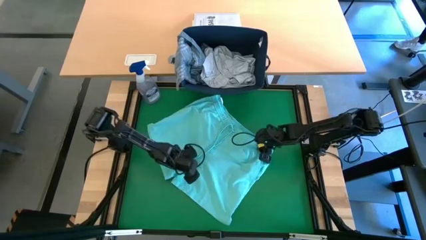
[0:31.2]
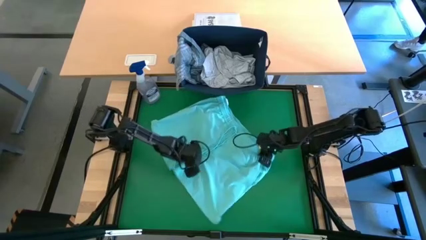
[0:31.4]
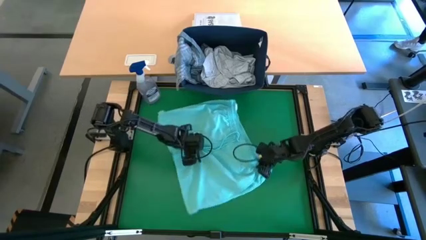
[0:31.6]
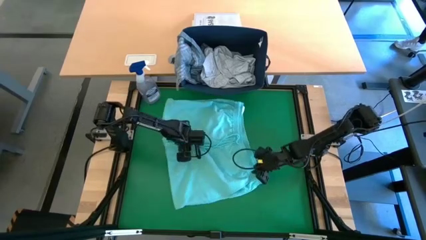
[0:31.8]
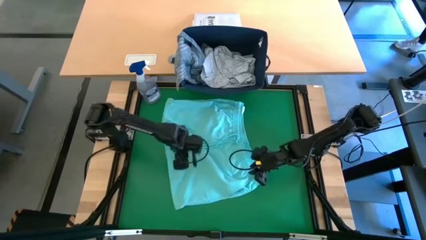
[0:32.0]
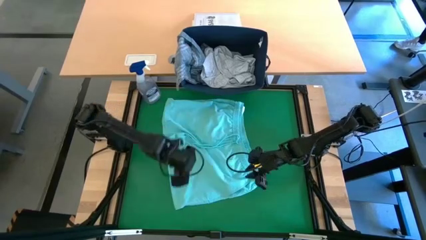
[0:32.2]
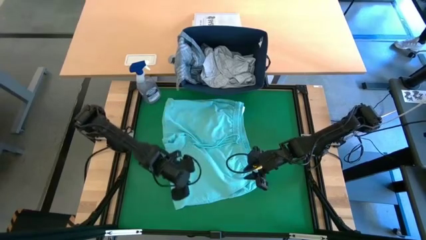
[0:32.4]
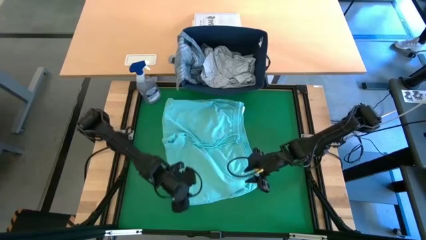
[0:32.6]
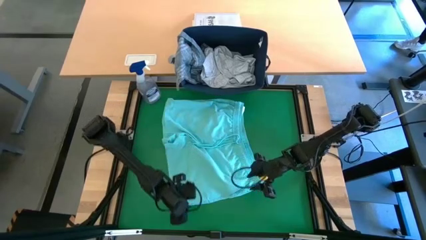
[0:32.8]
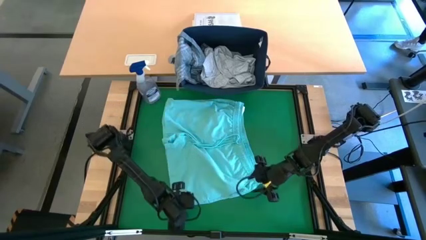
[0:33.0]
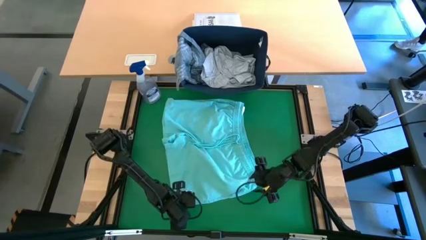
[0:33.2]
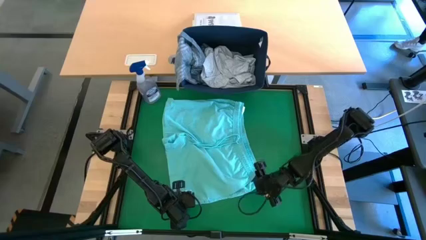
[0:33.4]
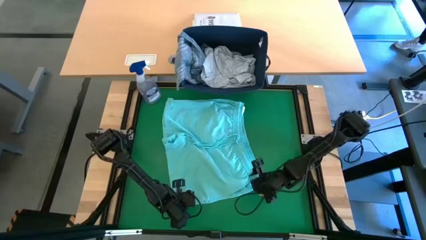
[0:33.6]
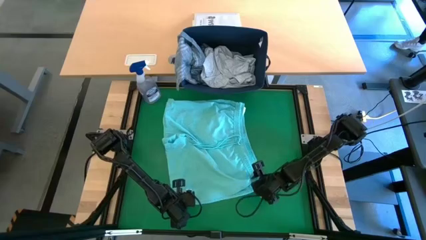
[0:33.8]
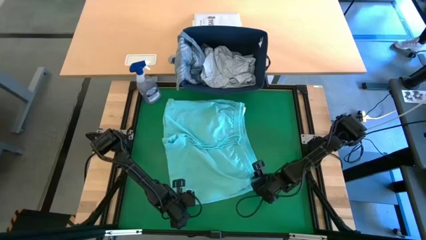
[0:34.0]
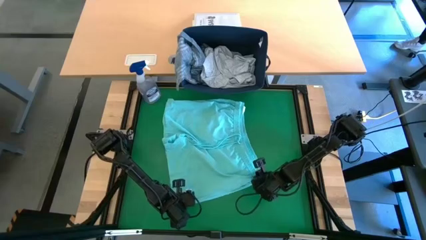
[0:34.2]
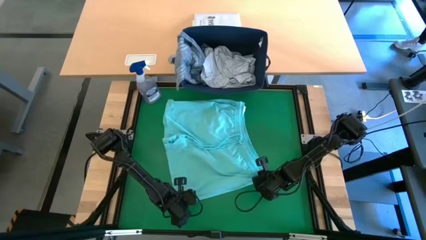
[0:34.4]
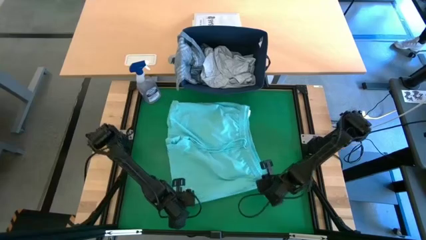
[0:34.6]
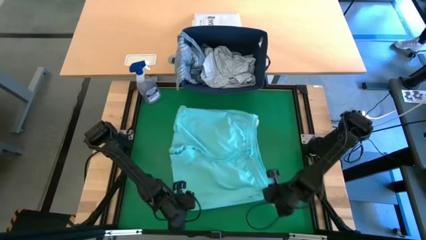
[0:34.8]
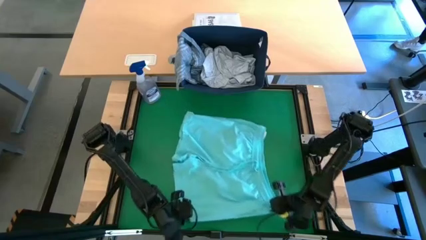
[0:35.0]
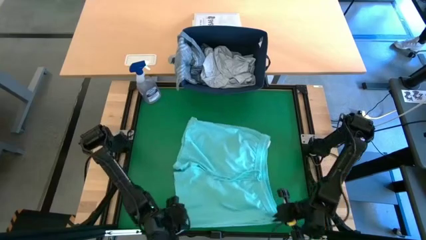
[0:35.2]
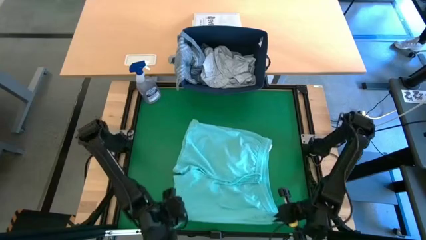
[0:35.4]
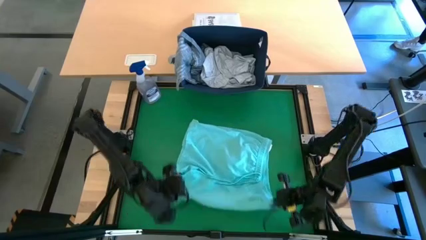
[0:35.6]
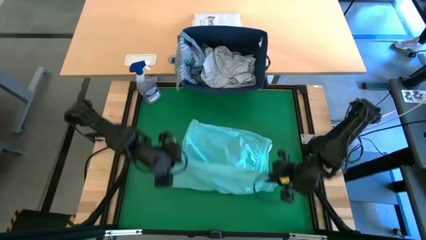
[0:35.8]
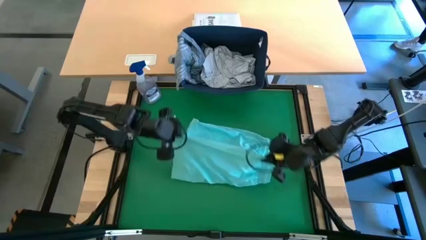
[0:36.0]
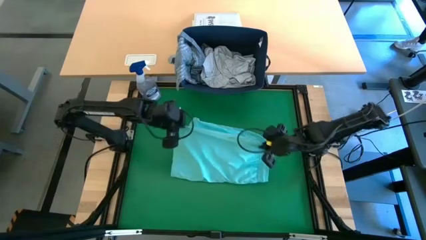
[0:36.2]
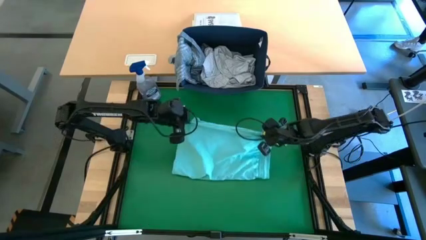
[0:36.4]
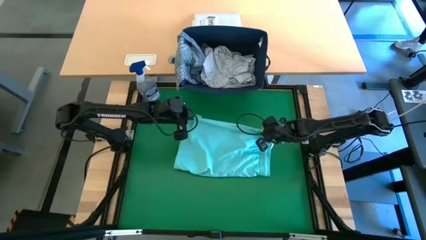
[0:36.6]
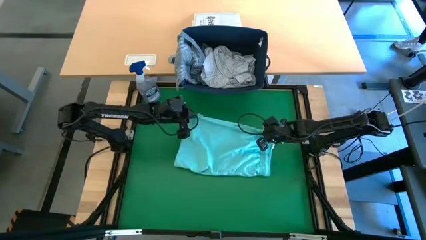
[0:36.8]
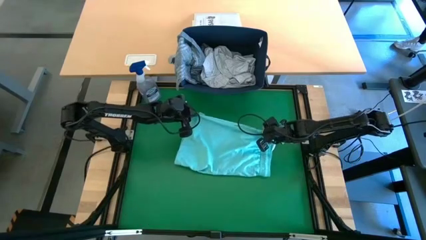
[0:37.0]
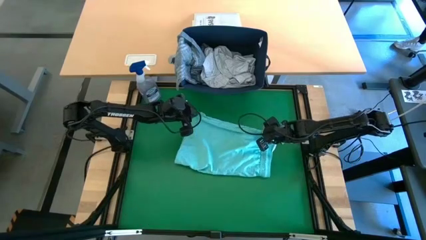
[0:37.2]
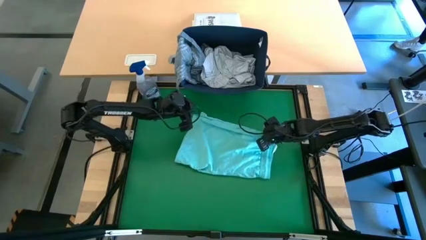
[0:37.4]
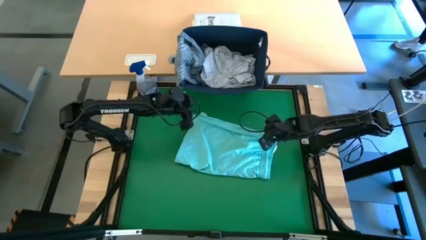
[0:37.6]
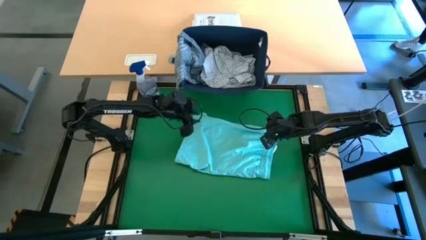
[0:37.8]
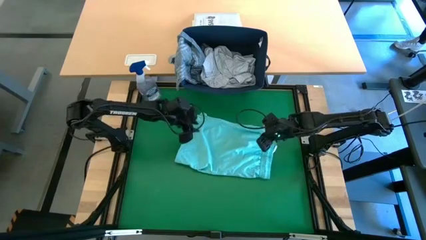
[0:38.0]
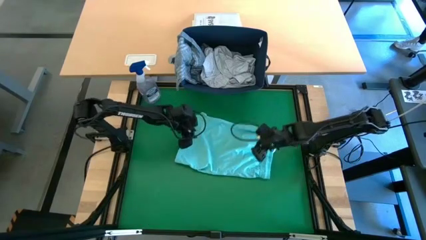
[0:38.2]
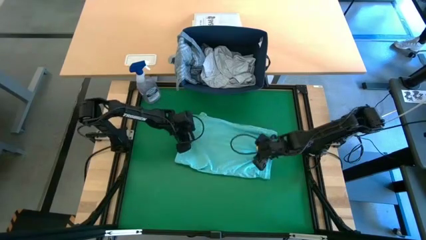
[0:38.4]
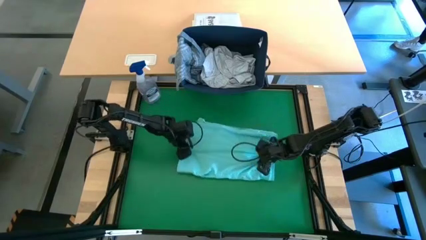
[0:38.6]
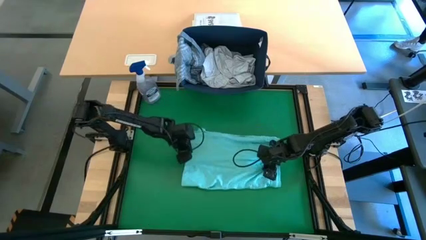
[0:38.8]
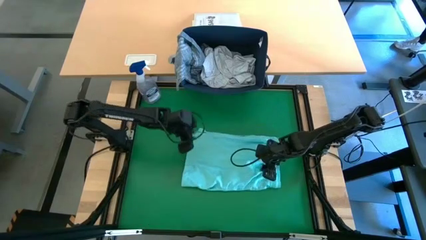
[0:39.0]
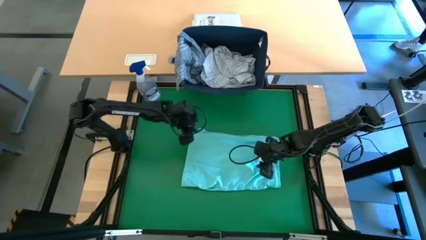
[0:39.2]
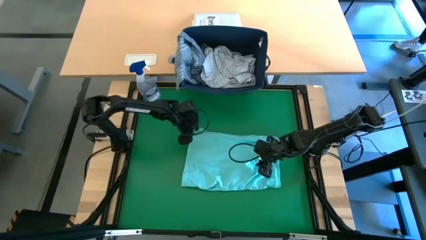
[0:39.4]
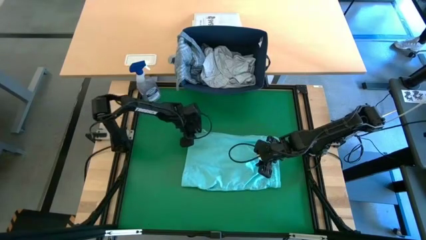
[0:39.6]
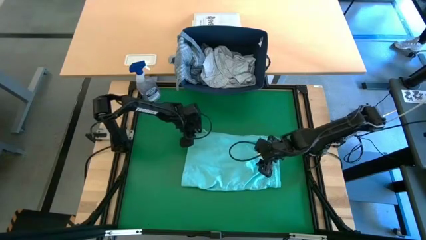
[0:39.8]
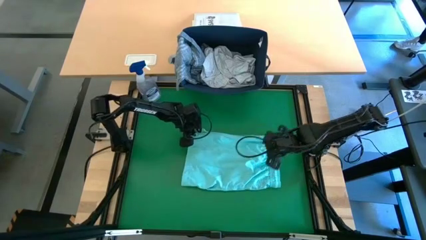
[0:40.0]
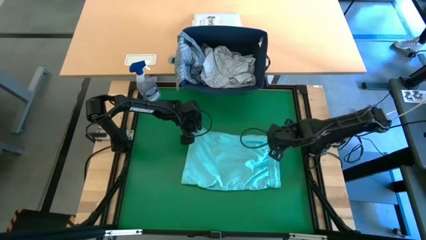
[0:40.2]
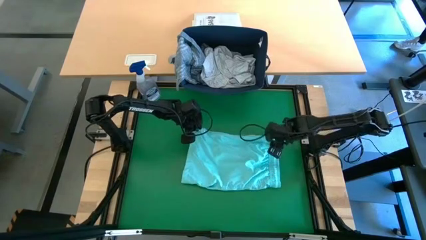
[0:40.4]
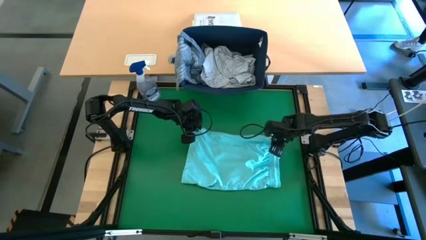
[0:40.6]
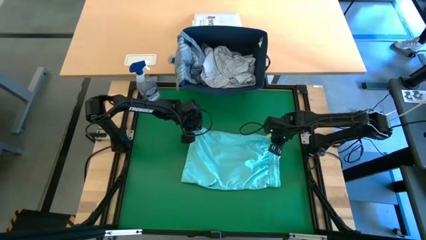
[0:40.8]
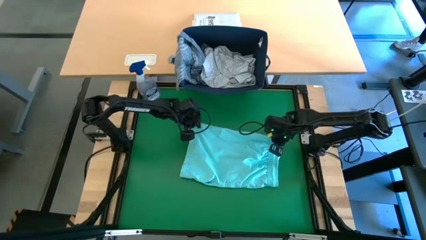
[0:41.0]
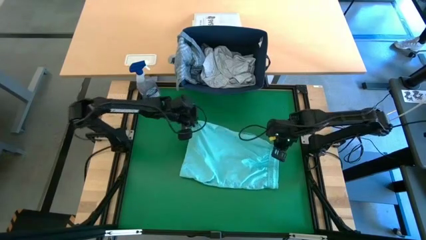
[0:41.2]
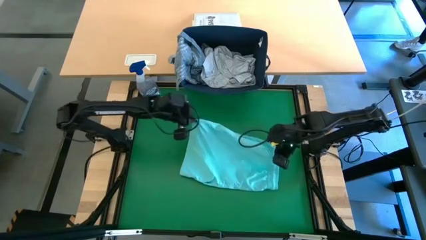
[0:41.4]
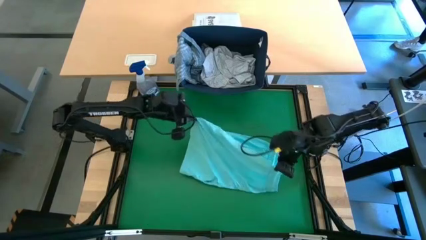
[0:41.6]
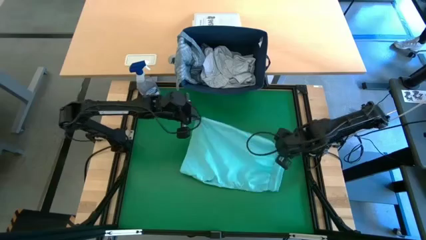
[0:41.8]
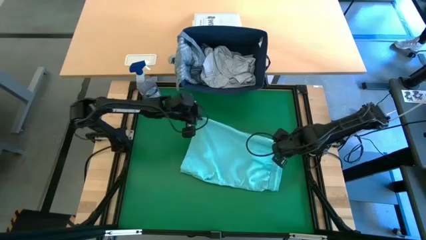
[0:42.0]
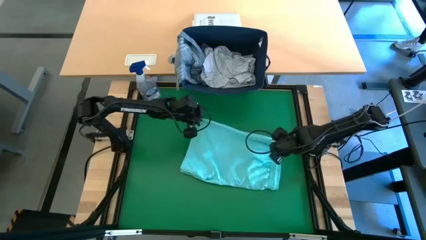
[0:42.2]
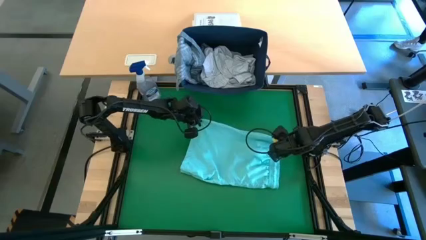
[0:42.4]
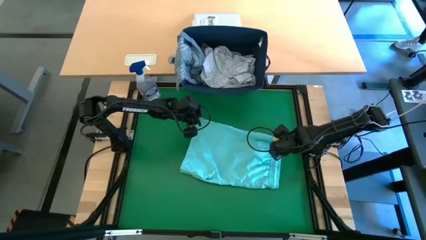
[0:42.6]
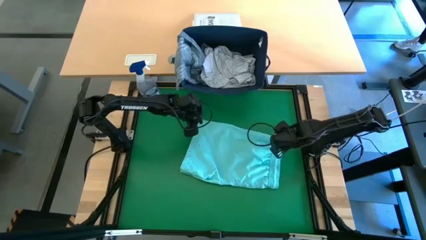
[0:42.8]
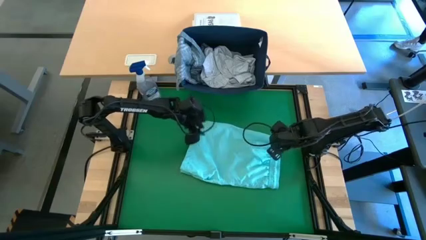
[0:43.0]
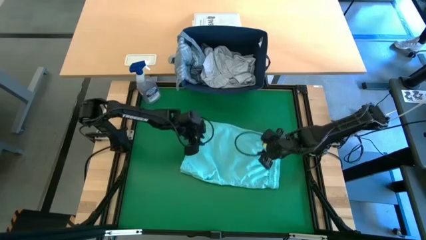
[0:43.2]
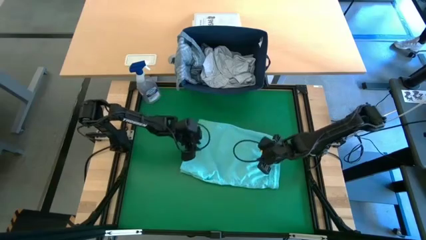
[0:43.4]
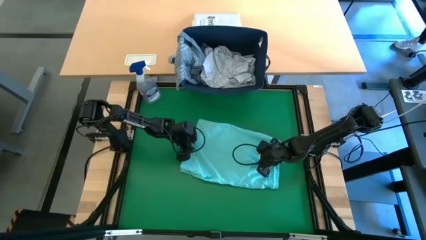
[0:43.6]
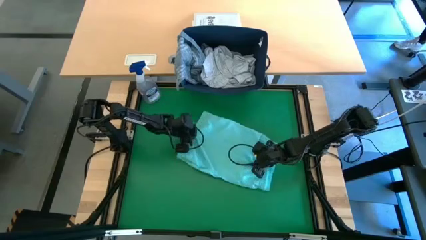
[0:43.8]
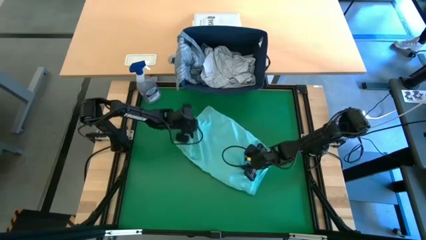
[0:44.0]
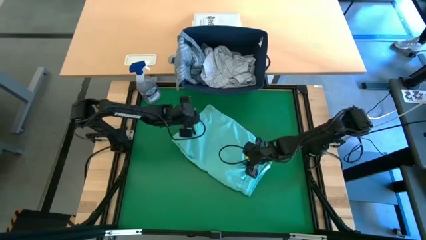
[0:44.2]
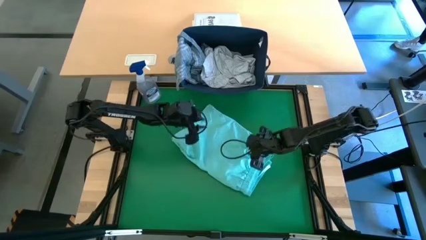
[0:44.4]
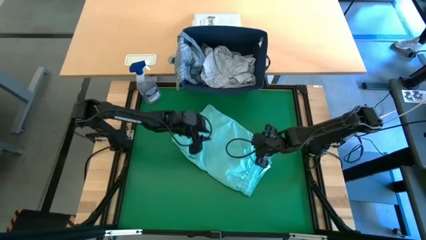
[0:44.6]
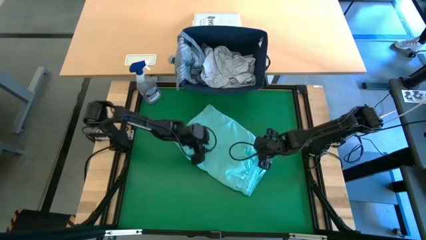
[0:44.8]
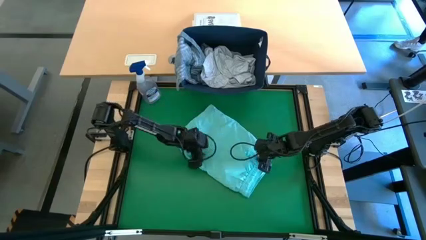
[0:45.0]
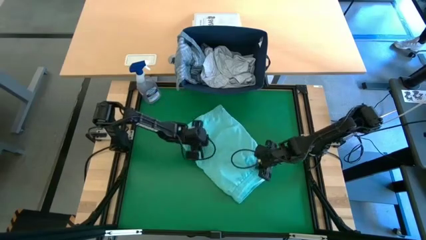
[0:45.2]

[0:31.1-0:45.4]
Task: Fold laundry
Fold the blue short

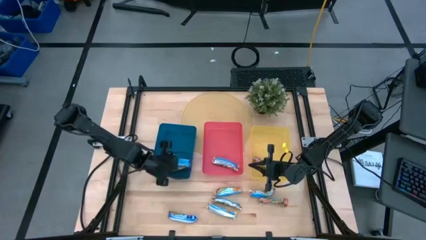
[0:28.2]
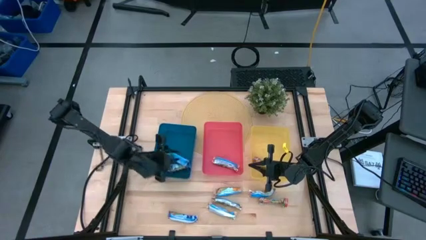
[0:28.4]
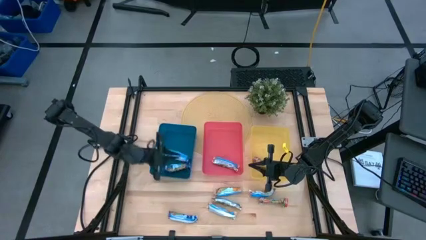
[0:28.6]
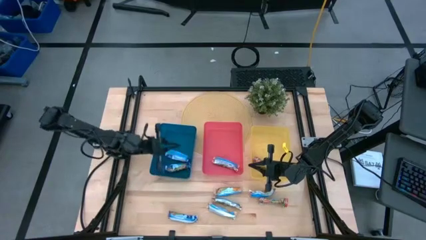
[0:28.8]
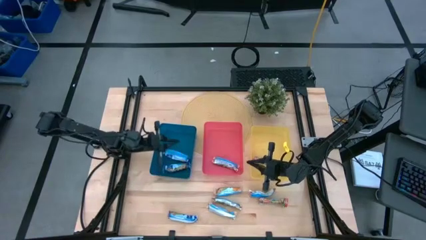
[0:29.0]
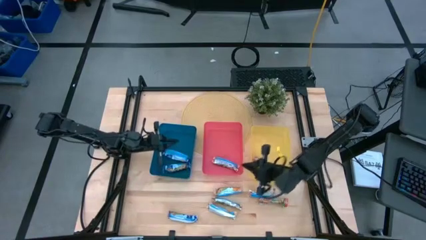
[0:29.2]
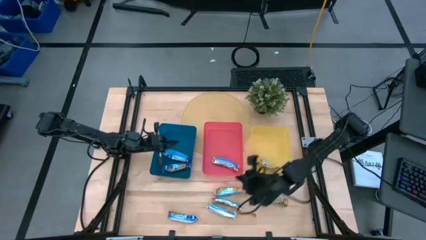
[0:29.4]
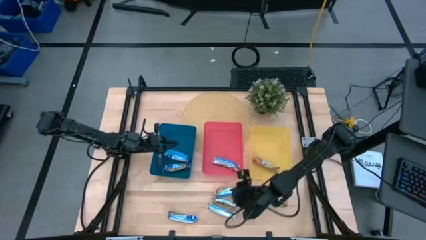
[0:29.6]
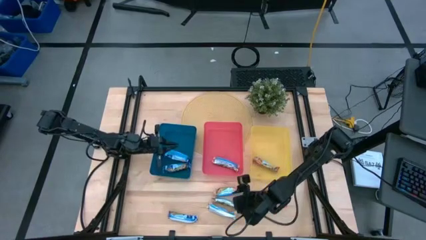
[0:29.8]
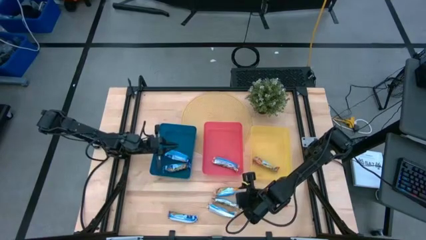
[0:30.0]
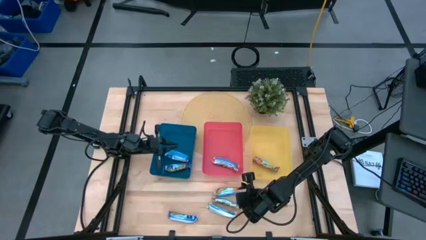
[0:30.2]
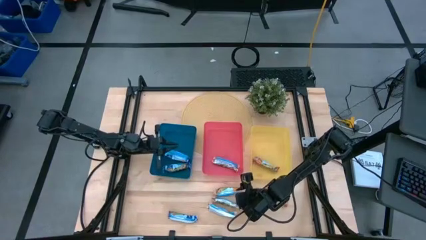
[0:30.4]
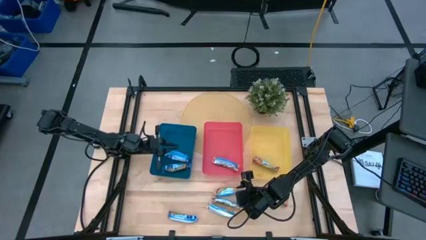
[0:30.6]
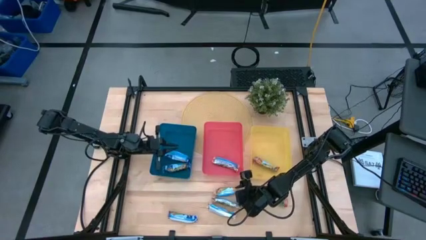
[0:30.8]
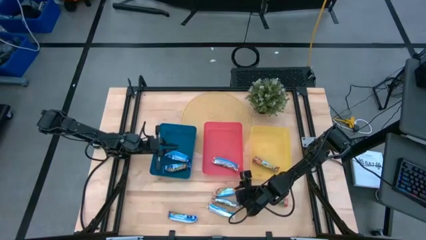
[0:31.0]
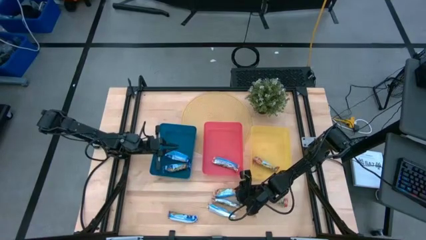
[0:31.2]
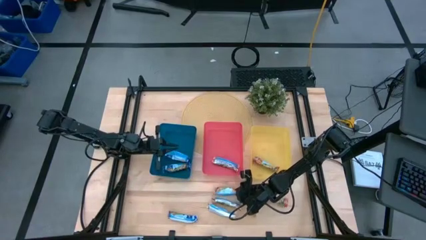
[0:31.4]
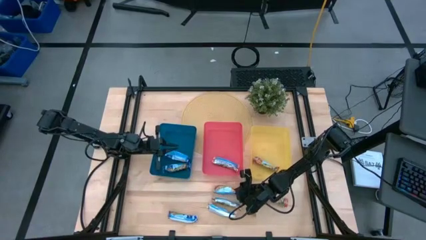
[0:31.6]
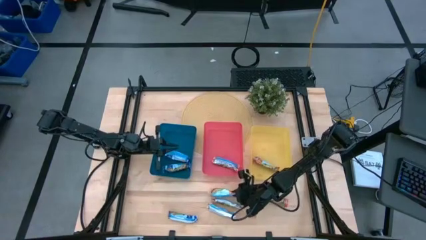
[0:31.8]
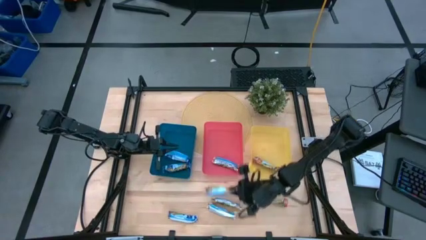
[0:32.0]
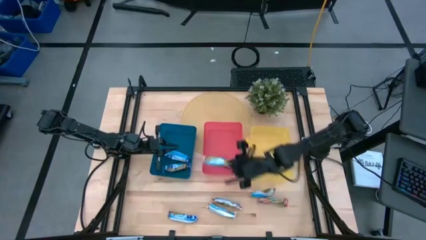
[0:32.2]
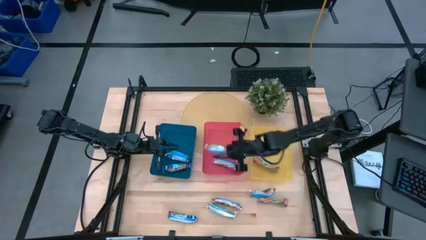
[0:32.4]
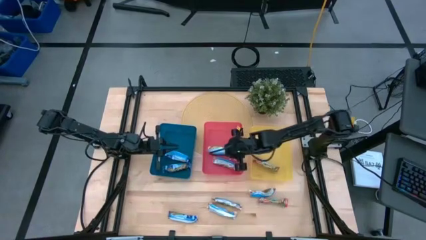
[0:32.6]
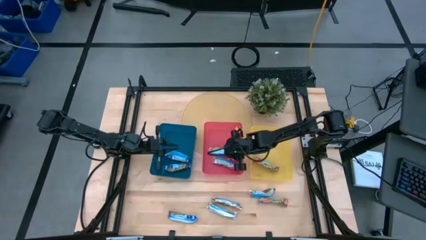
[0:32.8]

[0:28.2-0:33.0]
Task: Pick and place Granola Bars by type
Put the yellow granola bar into the red bin
